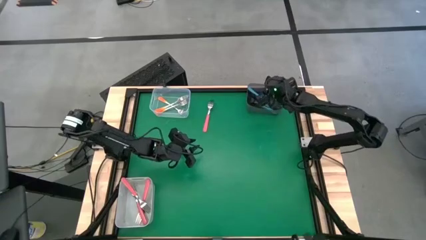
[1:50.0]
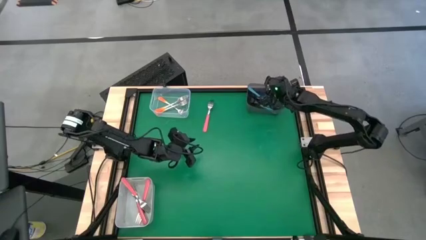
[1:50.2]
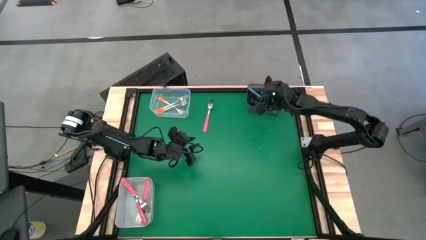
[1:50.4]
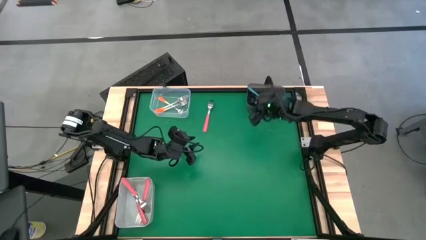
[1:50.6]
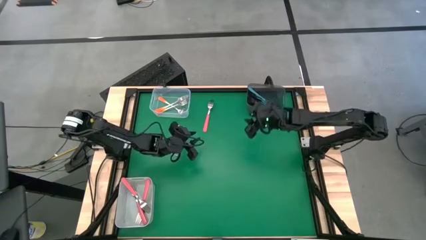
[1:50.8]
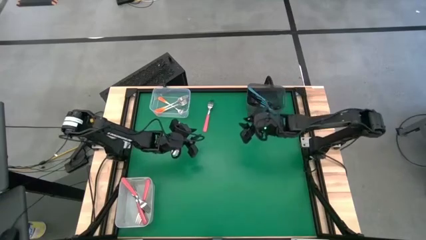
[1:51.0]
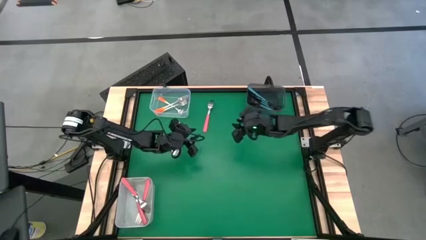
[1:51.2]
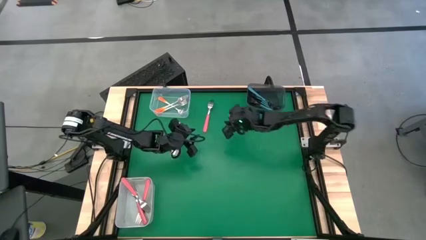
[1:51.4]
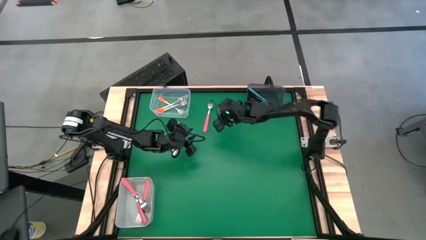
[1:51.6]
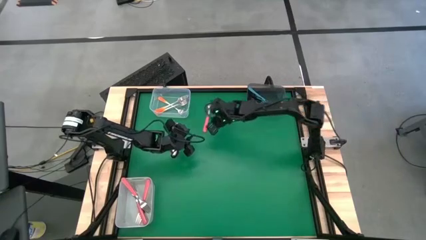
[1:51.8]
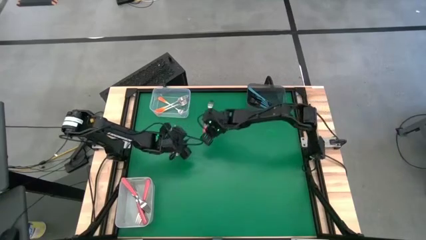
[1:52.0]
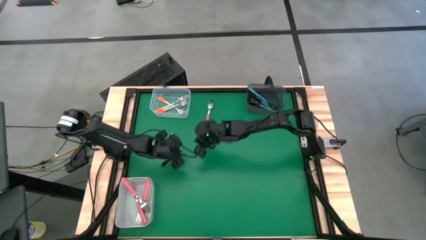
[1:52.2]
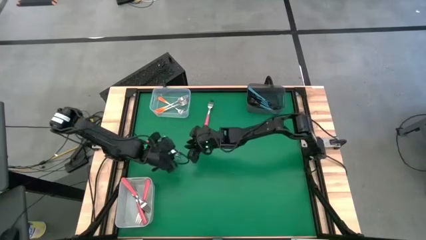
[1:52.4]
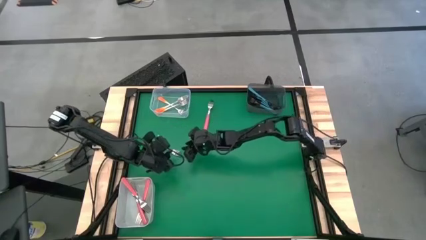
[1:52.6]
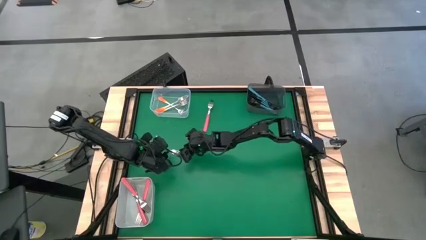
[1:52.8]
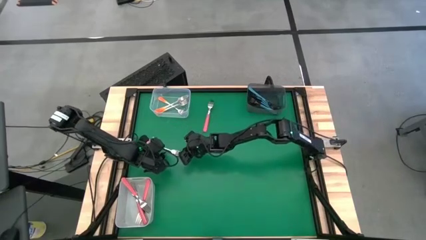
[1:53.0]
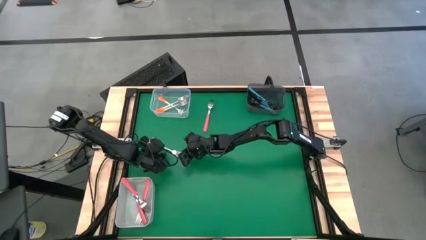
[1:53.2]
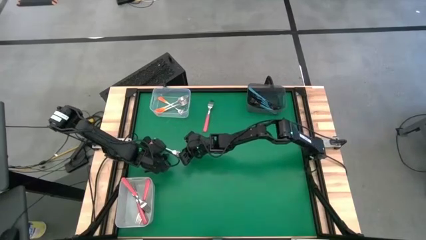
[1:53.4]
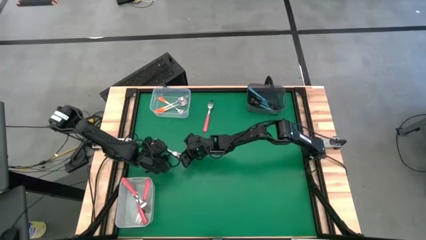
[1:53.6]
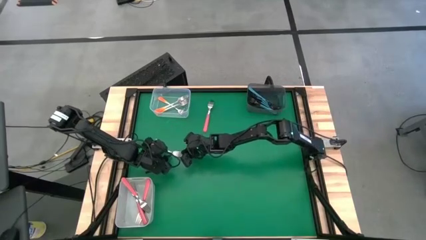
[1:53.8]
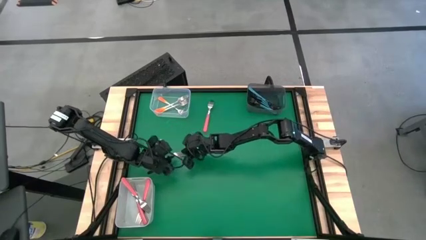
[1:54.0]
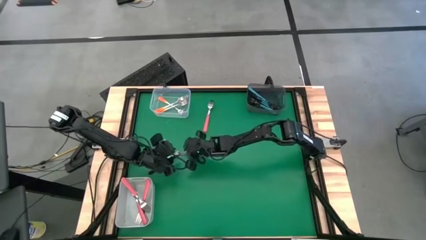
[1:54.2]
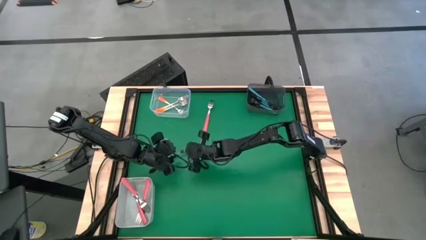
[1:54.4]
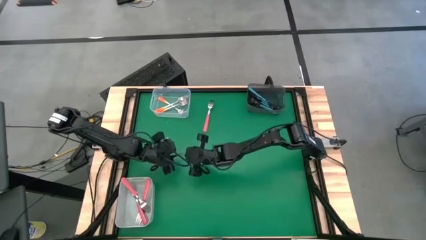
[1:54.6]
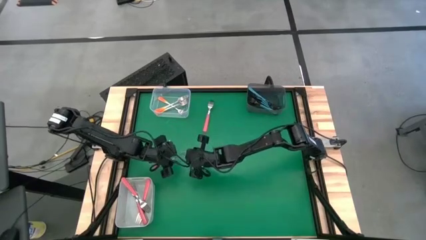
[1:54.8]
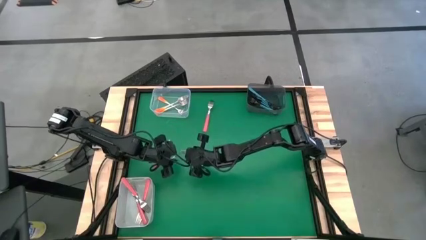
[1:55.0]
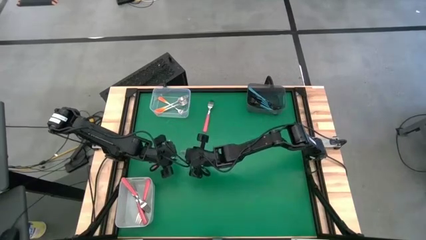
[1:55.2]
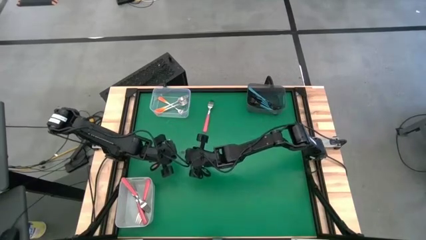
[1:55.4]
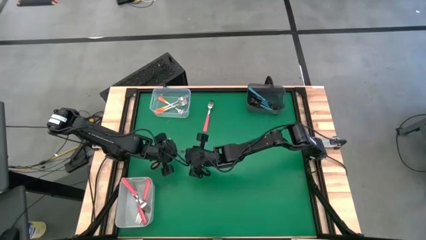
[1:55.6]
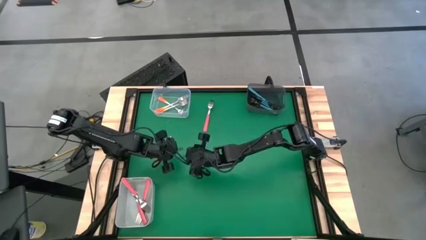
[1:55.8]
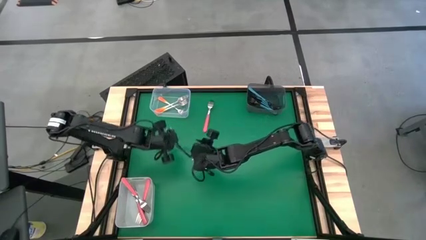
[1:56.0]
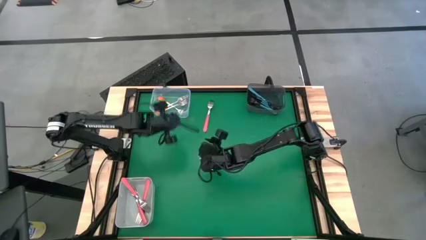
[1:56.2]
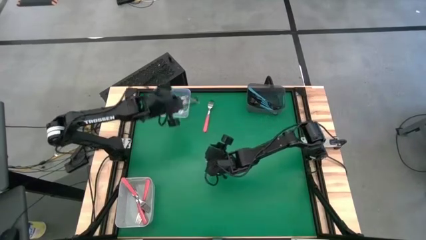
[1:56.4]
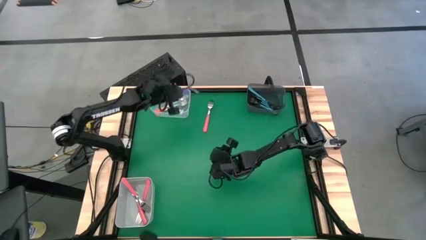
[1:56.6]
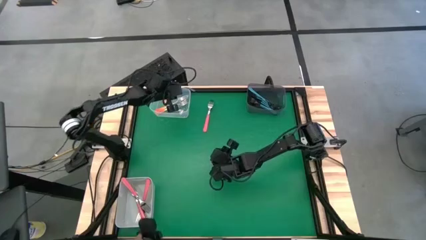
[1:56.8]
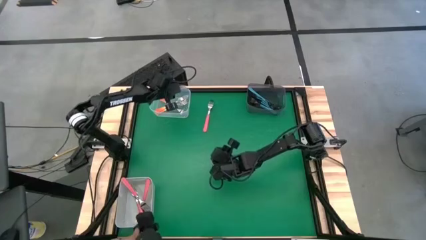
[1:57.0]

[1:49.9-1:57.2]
Task: Sort silverware by color (type)
Put the orange fork into the transparent bin

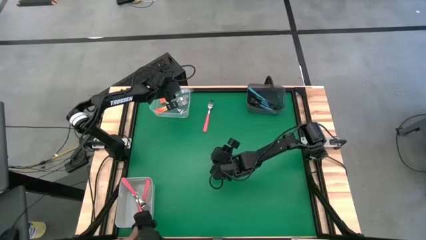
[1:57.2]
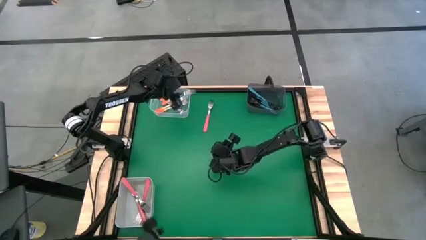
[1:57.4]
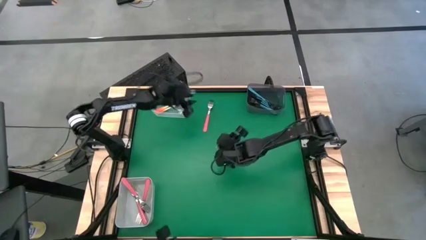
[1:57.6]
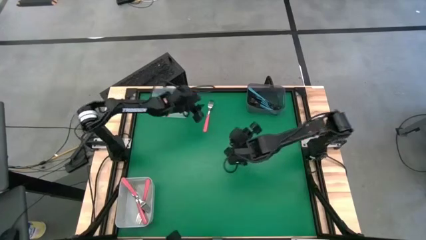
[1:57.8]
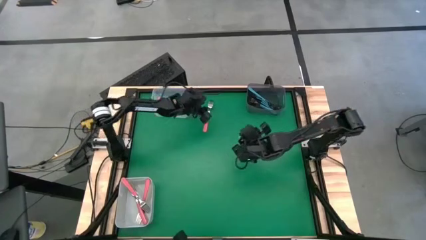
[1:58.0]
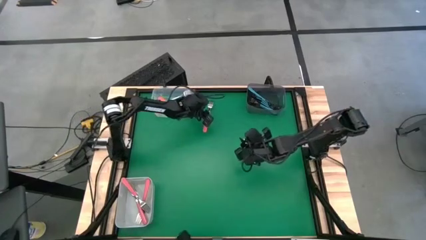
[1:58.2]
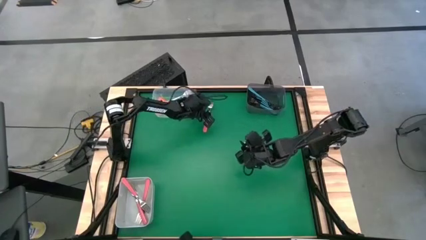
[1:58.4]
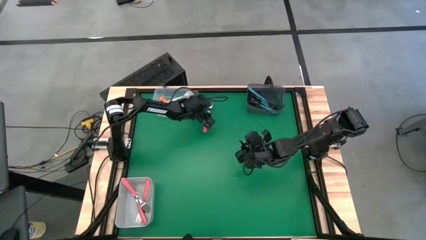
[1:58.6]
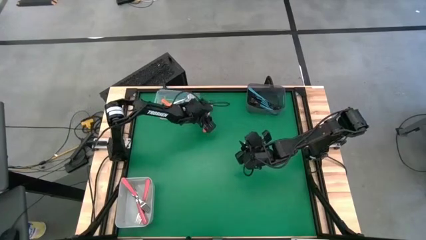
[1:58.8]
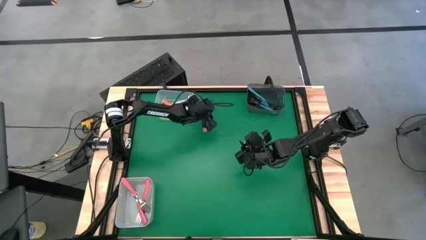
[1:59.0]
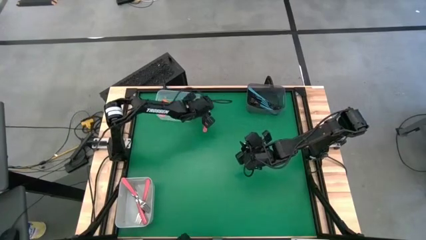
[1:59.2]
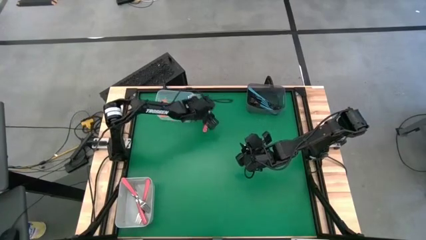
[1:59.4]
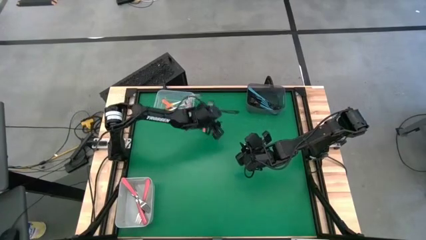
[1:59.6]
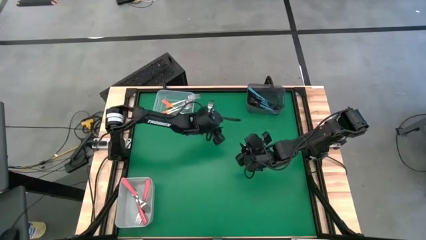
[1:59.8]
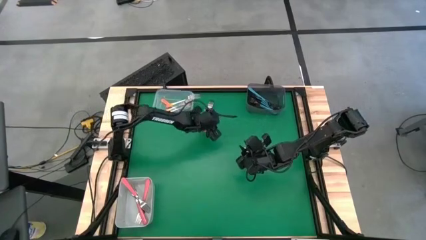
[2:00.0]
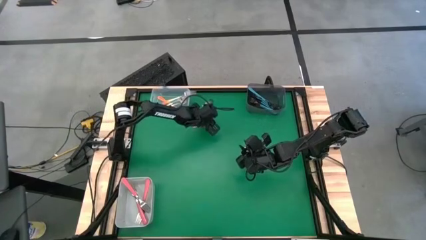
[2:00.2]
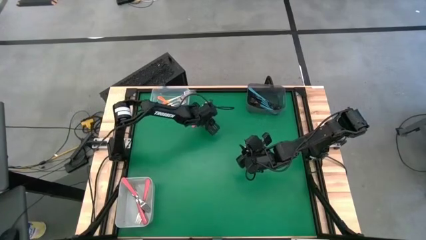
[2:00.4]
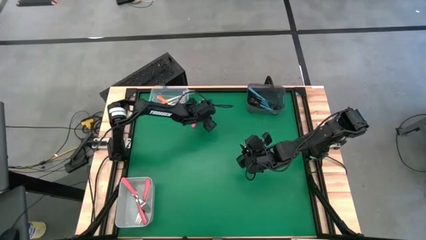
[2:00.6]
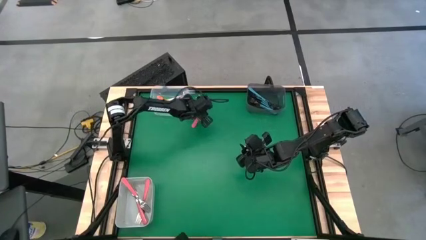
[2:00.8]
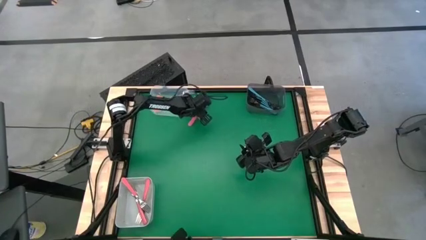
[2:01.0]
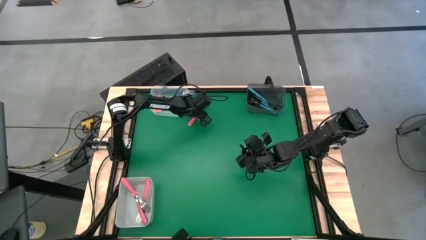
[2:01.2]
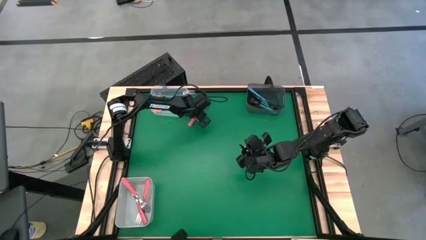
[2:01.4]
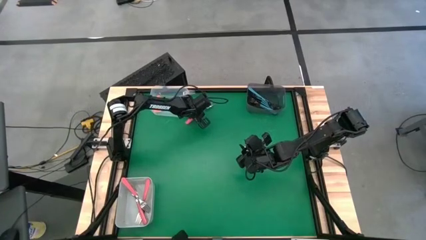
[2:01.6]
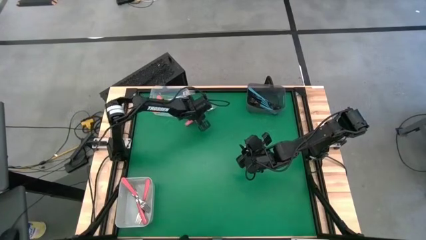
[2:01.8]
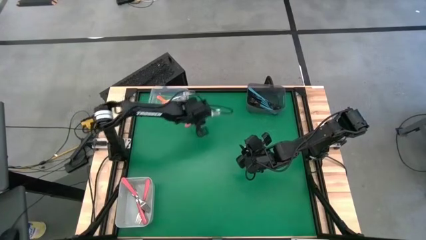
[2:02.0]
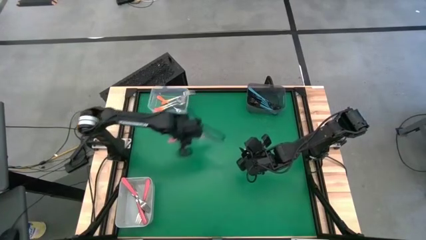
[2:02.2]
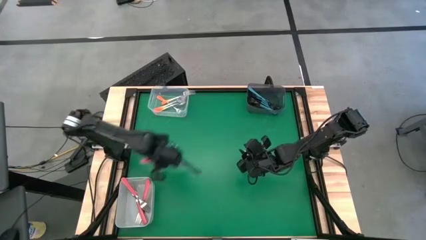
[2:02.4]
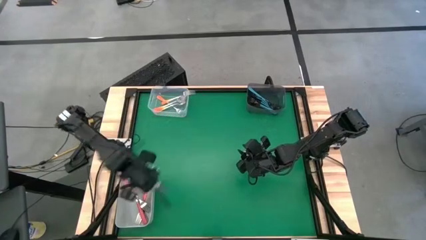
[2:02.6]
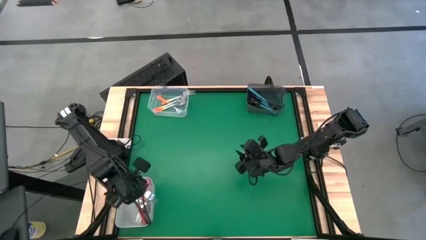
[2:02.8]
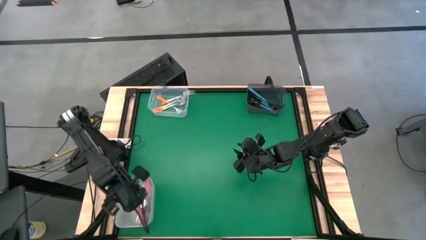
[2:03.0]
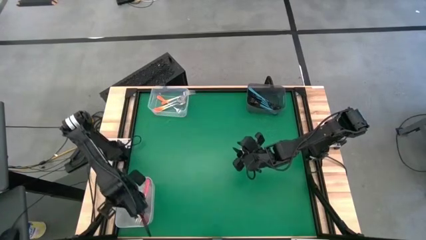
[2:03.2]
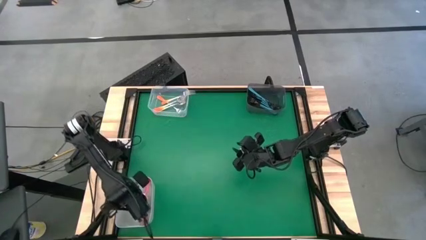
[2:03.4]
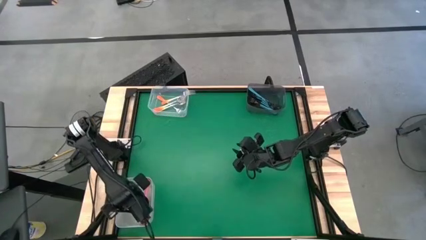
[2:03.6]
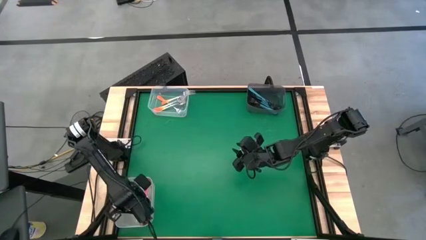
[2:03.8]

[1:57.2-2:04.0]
Put the pink fork into the white bin

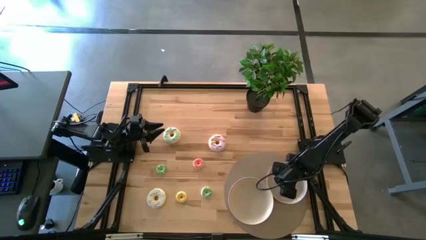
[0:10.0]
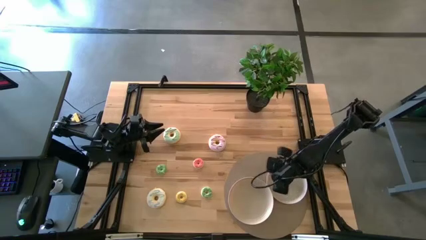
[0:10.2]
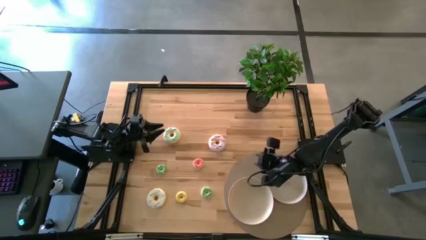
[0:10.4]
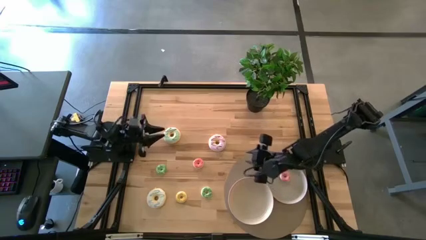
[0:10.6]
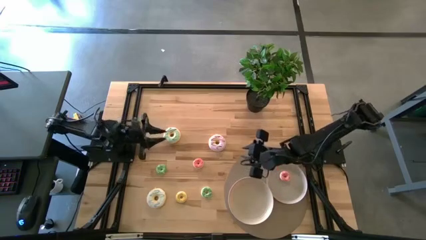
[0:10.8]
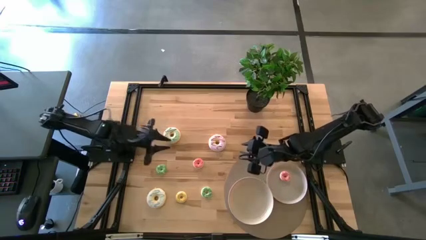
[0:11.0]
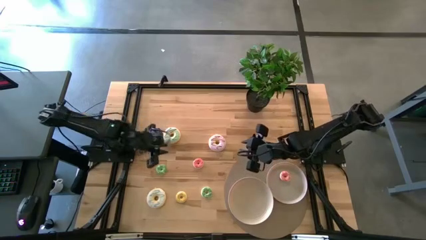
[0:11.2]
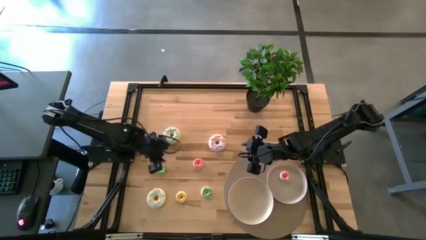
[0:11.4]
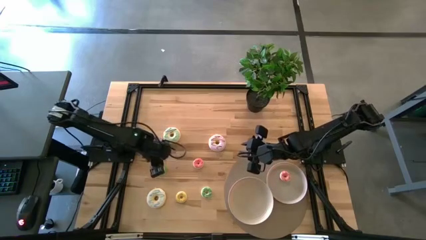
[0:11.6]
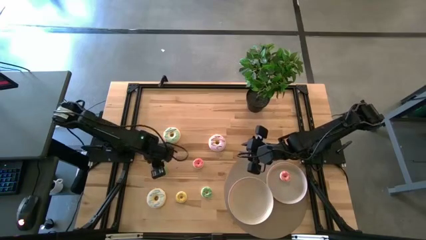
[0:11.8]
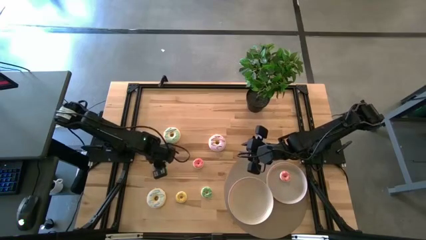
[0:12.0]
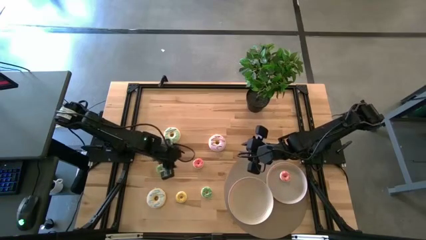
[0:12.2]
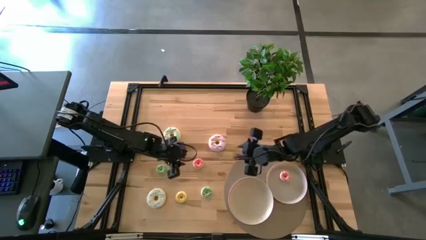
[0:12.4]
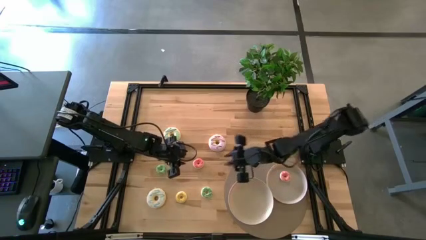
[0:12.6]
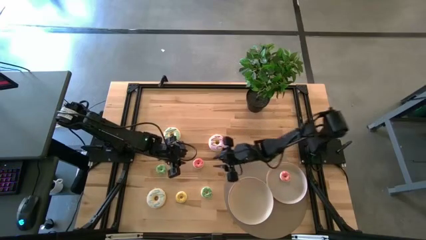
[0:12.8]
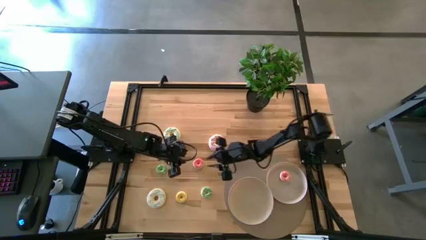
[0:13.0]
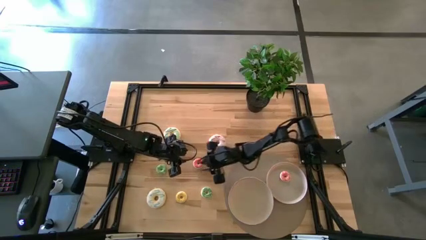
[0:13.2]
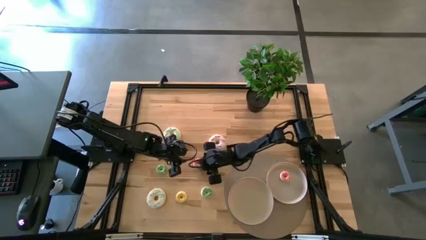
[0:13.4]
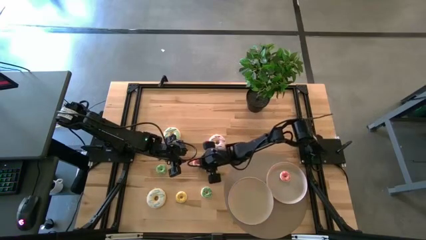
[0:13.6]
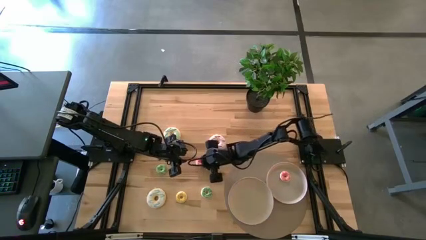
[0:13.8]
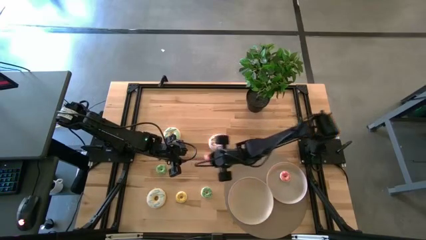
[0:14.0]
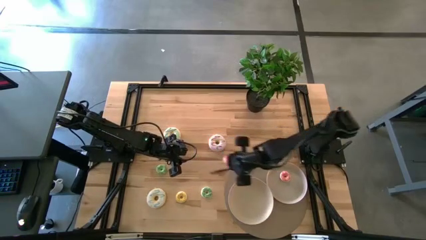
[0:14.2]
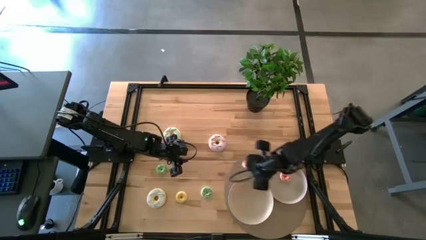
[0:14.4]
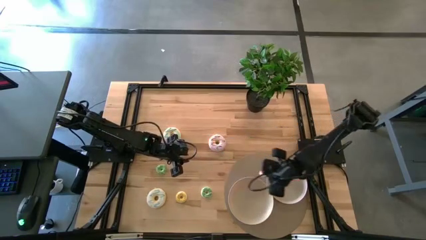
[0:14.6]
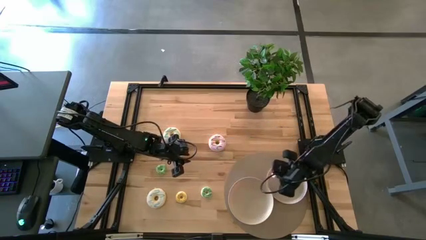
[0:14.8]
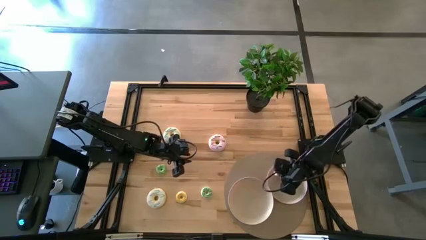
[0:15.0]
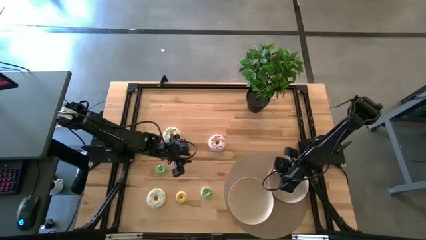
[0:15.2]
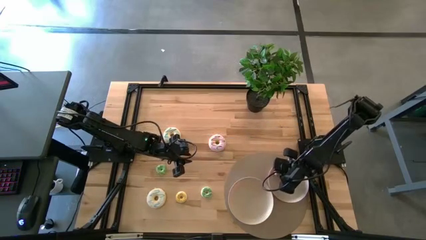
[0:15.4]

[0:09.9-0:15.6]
Task: Pick & Place donuts
Put the small pink donut into the right white plate
